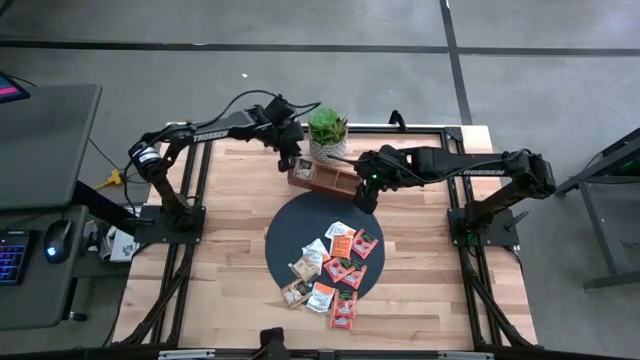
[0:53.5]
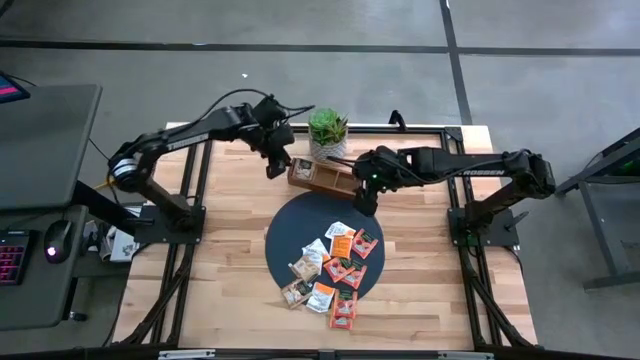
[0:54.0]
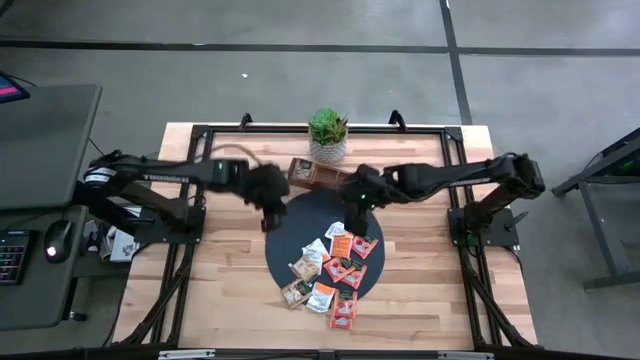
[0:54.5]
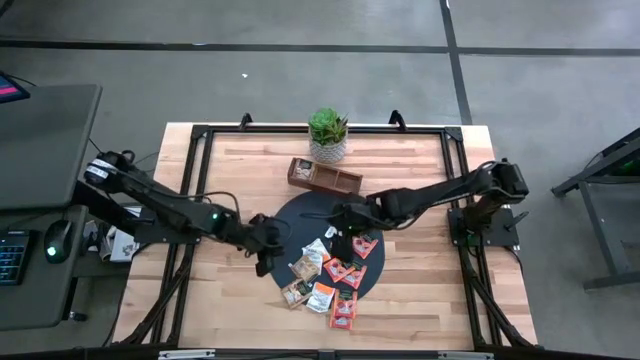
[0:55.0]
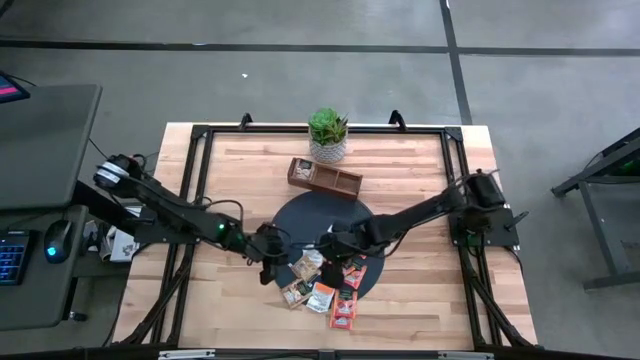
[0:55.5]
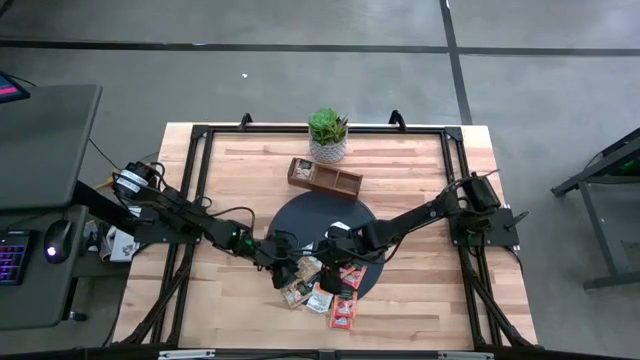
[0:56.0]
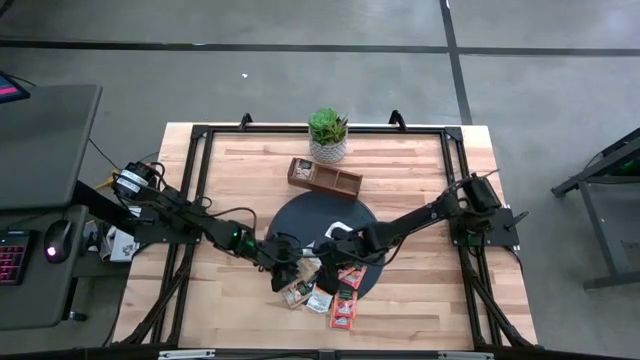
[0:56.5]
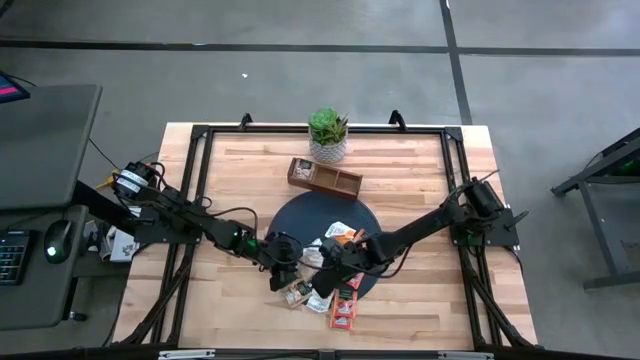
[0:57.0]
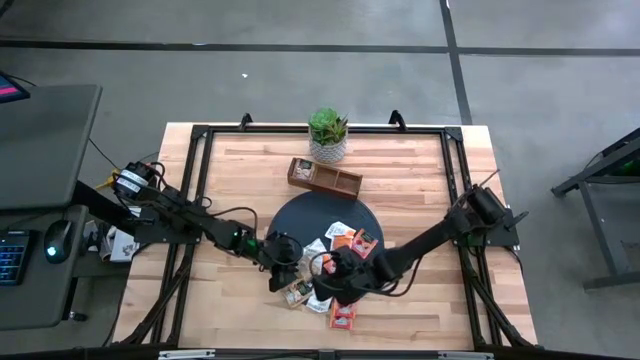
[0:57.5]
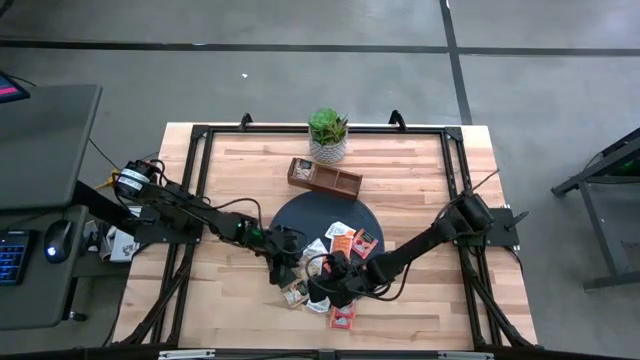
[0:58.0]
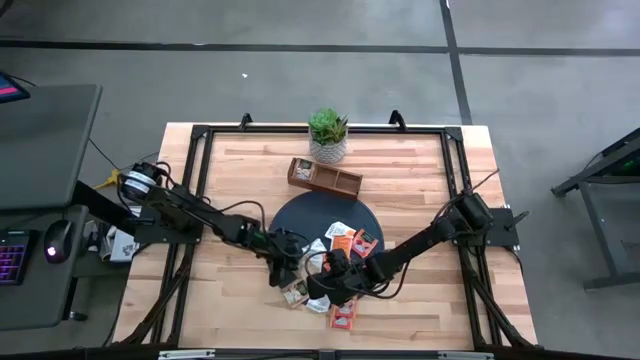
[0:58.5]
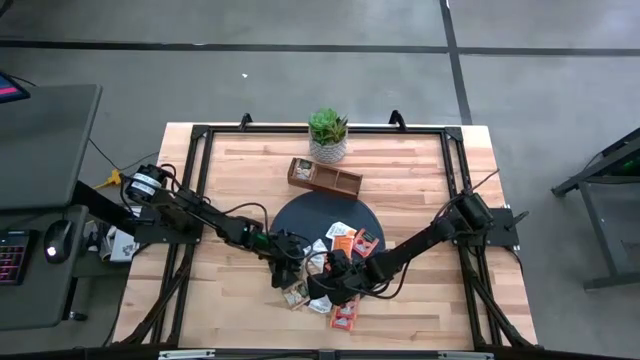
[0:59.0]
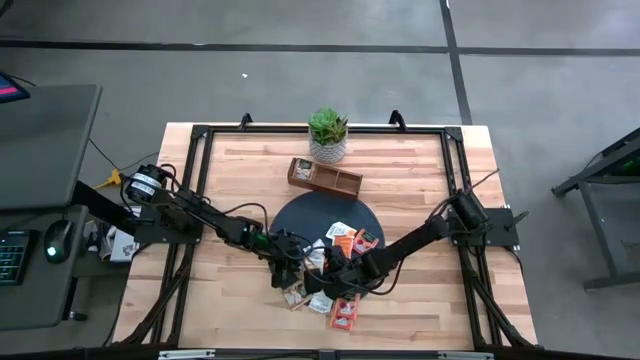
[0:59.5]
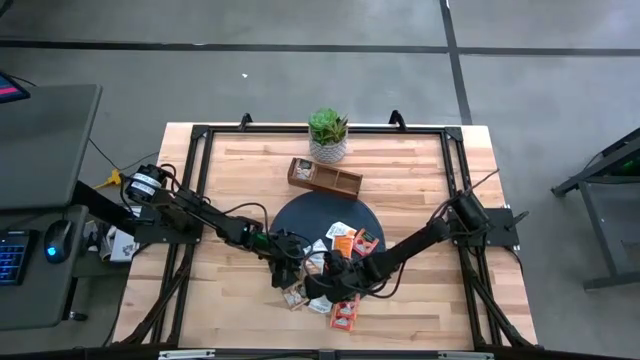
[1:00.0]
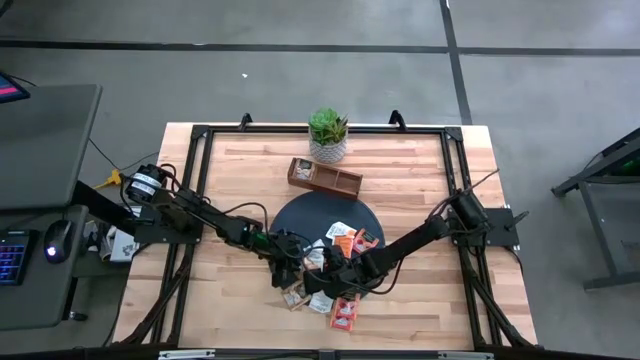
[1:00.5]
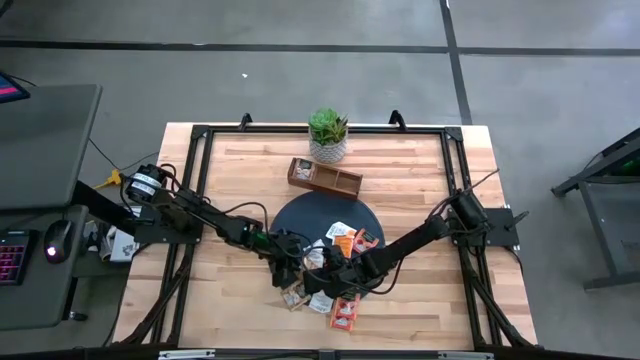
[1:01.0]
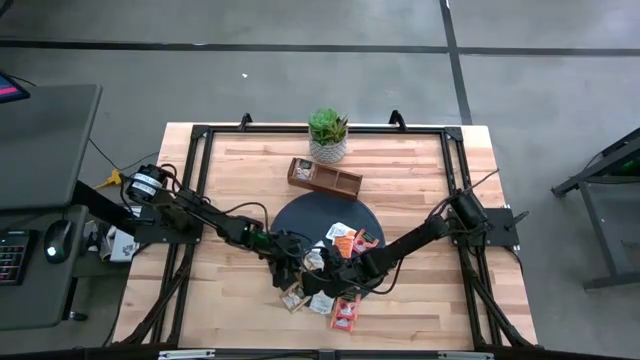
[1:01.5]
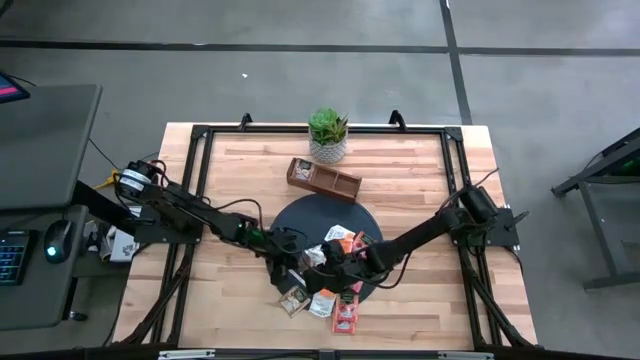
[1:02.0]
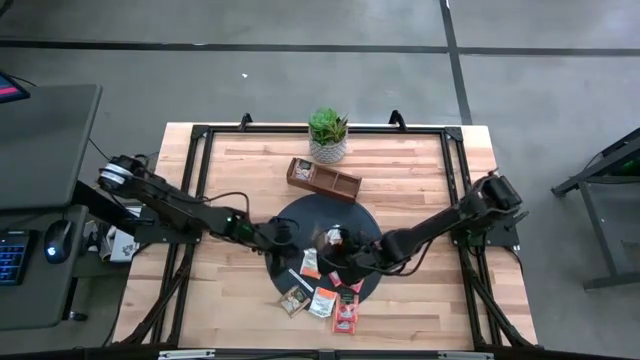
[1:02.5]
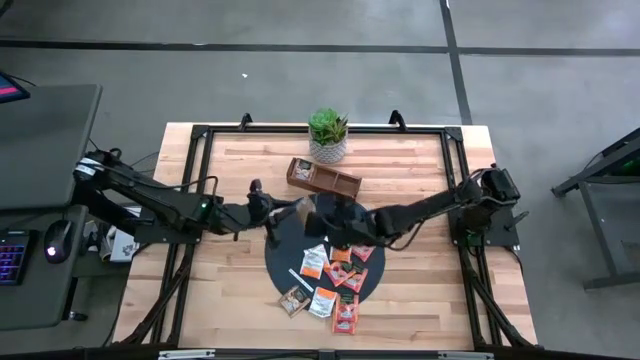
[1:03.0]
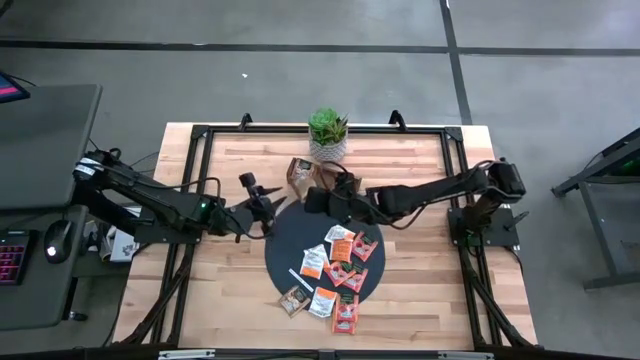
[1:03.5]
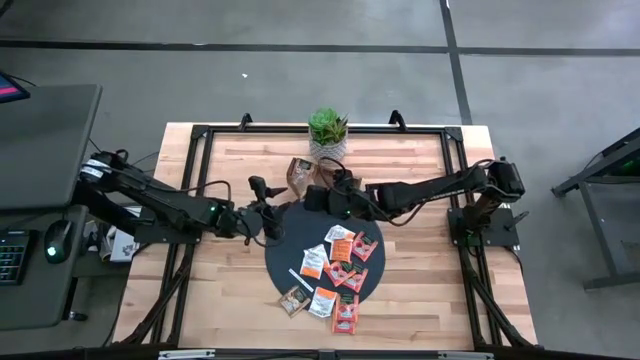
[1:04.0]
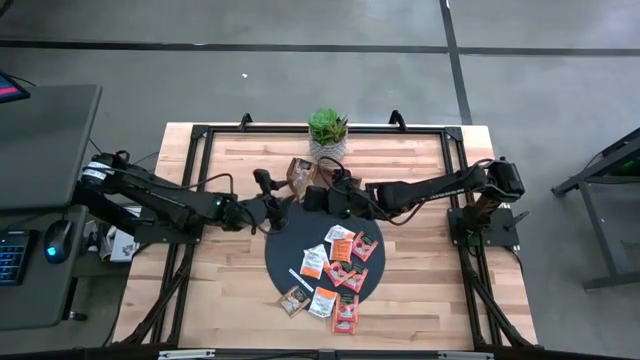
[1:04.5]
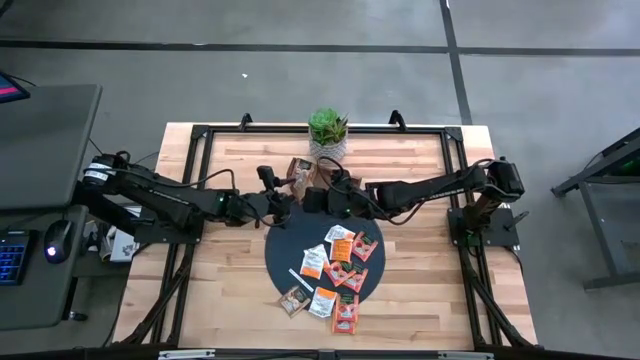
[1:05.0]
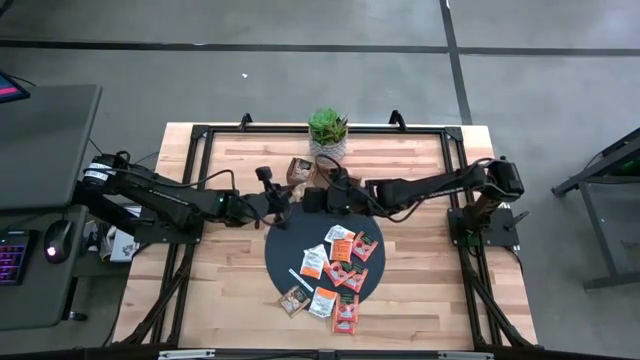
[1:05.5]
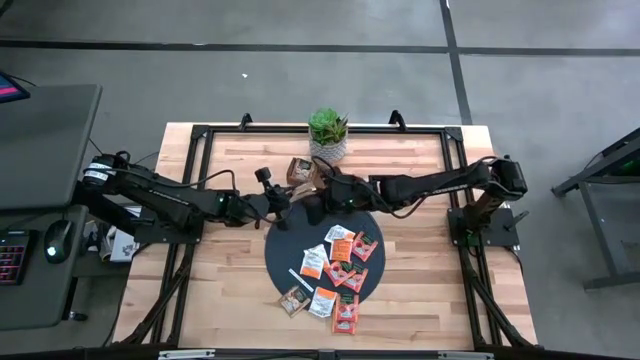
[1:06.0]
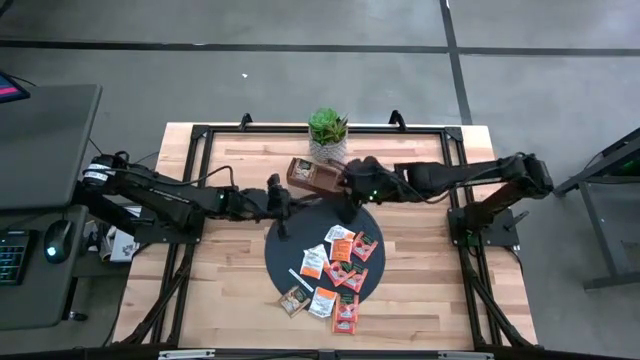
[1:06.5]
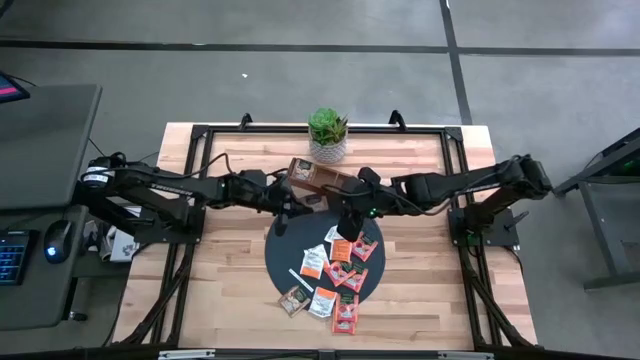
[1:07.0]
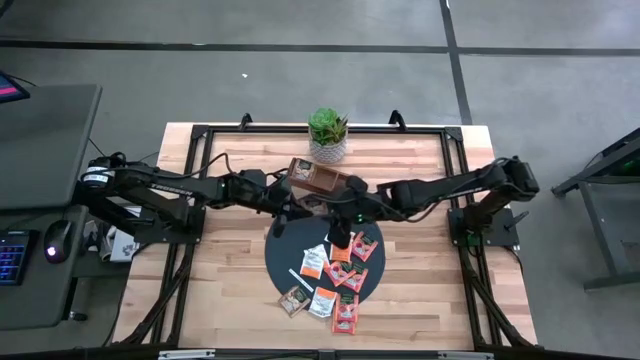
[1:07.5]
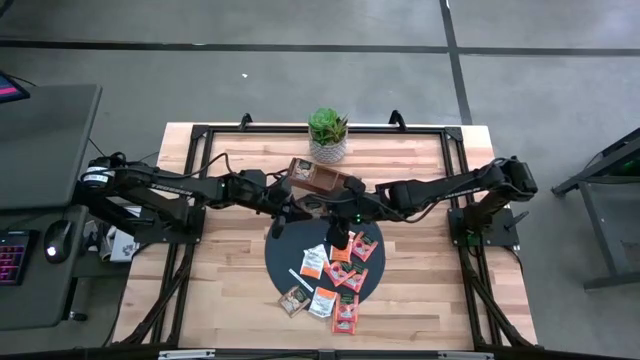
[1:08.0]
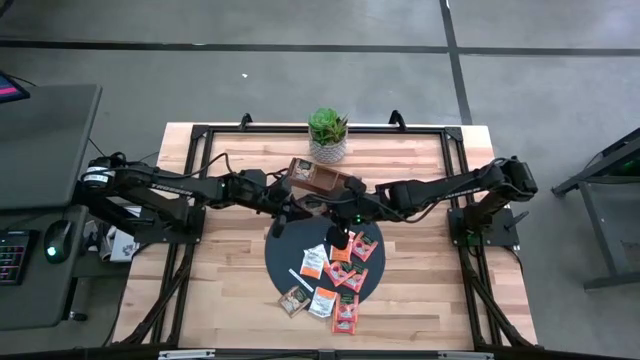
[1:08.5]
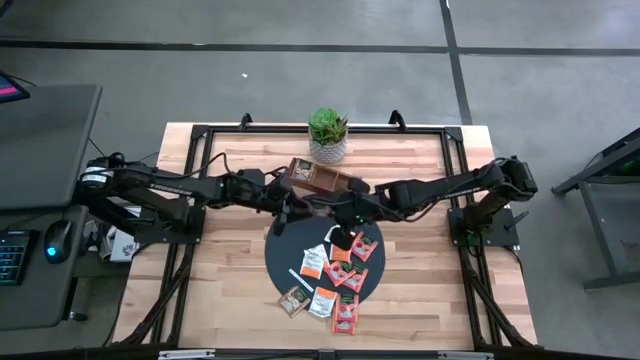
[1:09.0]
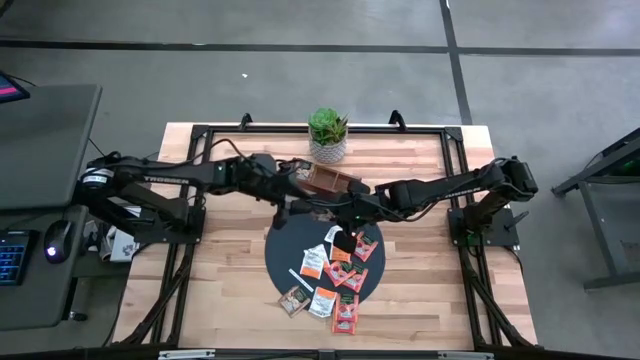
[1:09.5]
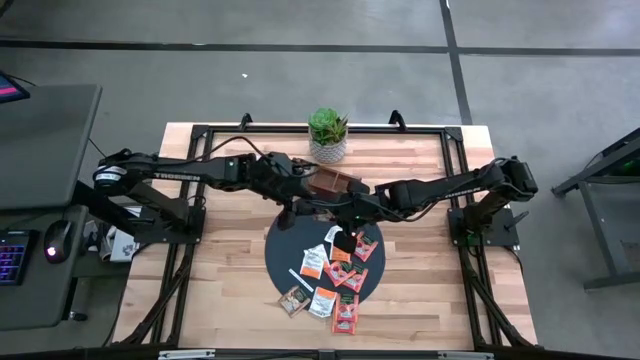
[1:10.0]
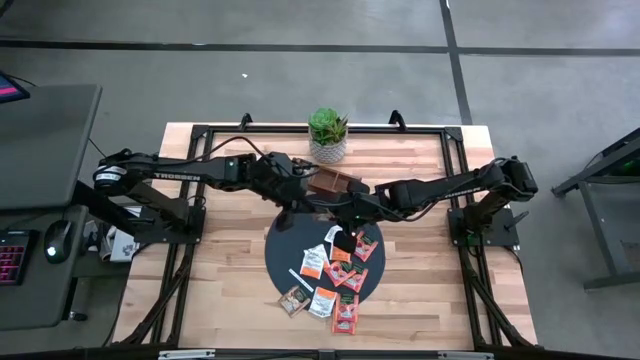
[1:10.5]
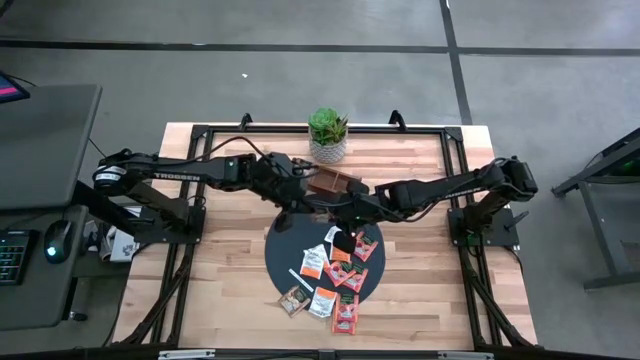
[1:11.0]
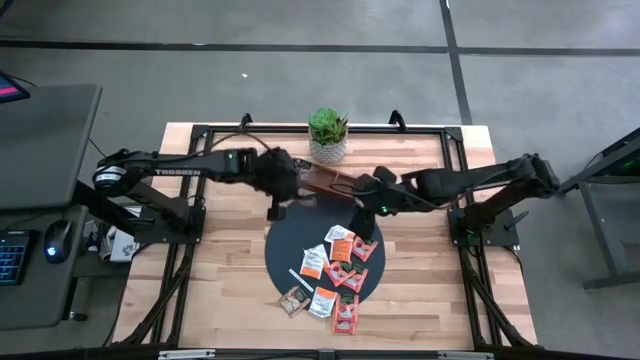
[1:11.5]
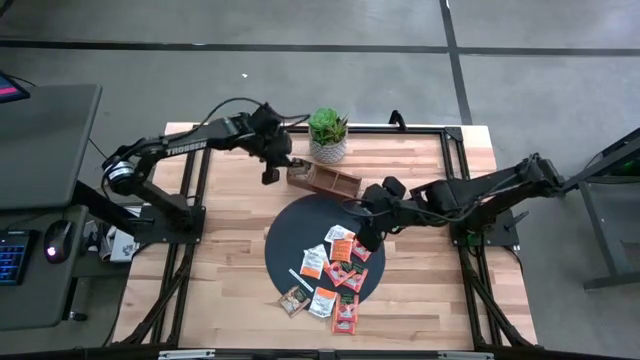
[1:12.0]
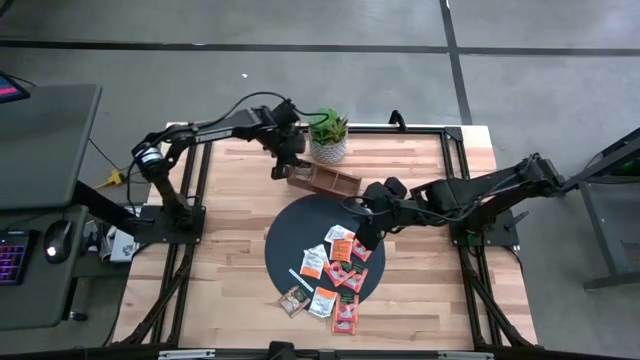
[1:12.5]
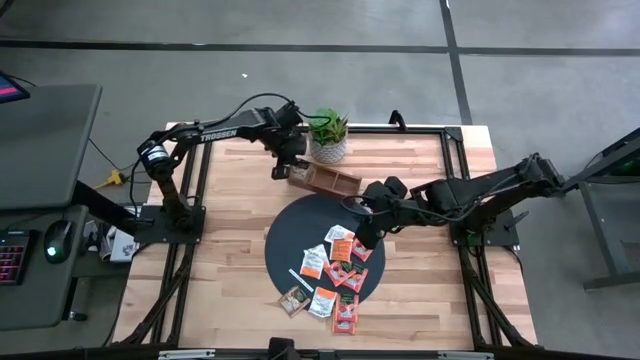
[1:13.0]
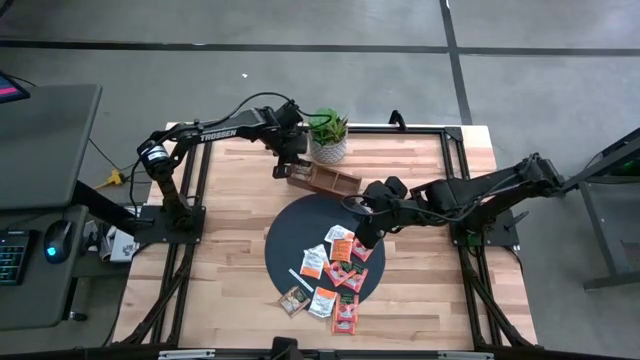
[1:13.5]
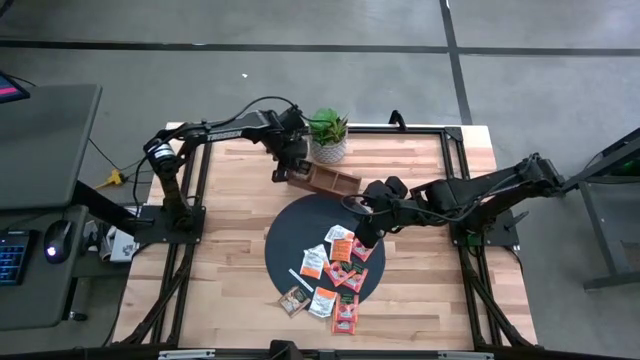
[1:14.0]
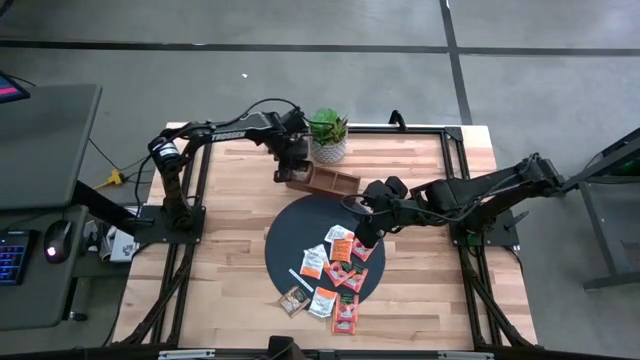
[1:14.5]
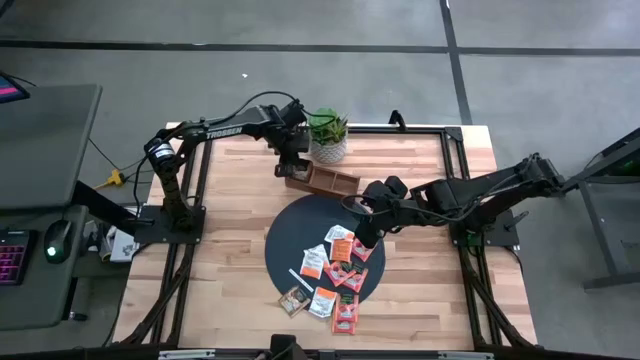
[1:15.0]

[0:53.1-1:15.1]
Task: Pick & Place Tea
Put the brown tea bag into the left section of the wooden organizer
